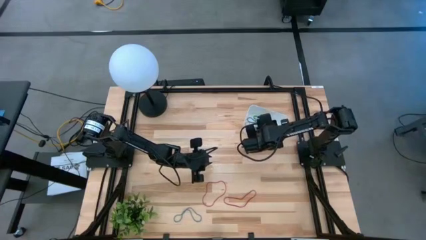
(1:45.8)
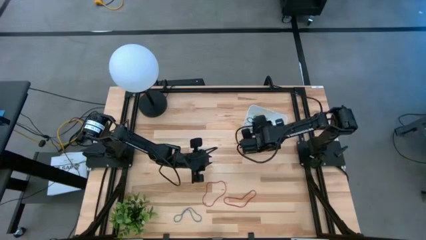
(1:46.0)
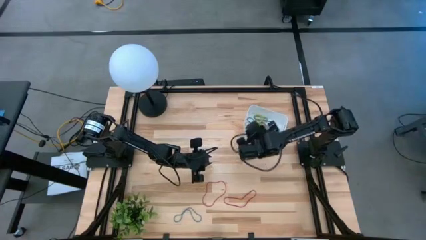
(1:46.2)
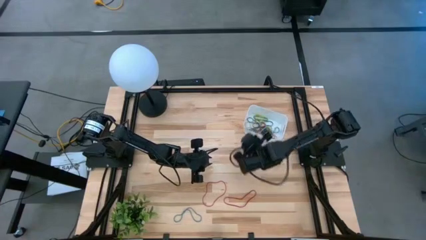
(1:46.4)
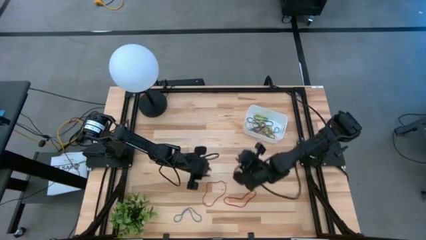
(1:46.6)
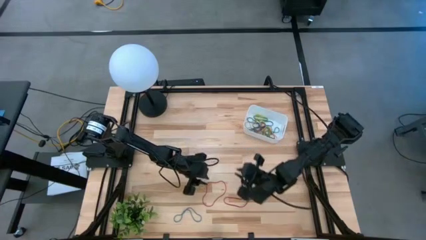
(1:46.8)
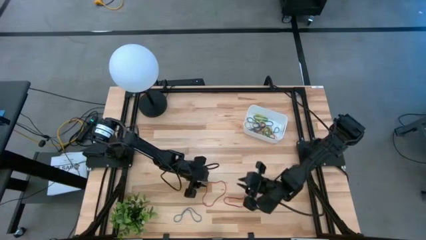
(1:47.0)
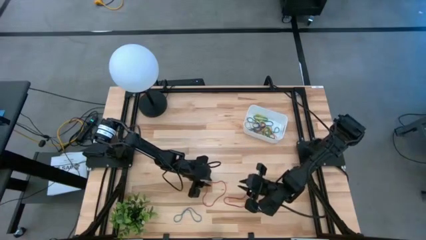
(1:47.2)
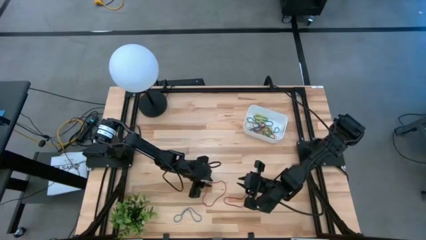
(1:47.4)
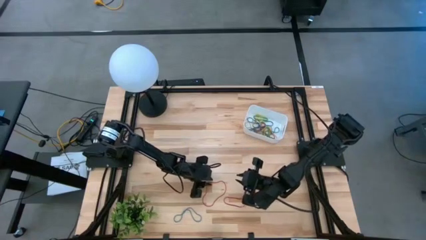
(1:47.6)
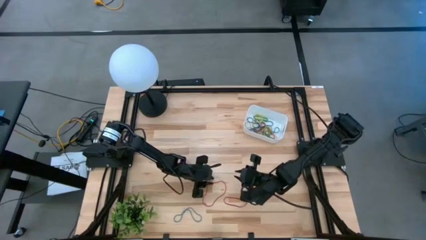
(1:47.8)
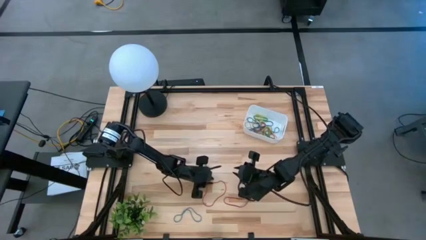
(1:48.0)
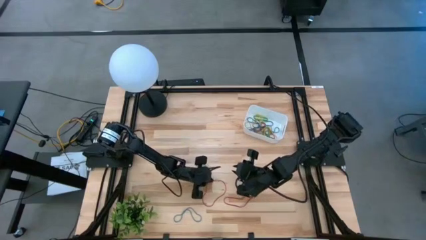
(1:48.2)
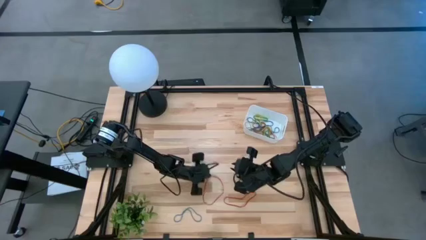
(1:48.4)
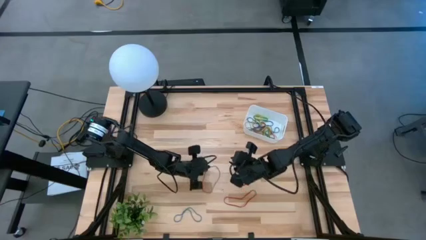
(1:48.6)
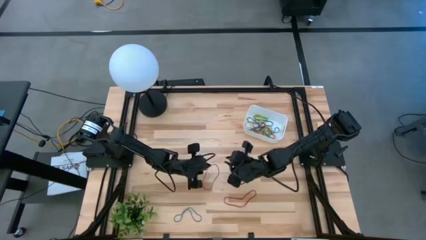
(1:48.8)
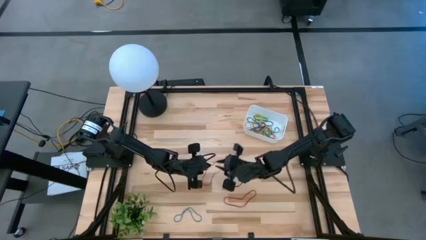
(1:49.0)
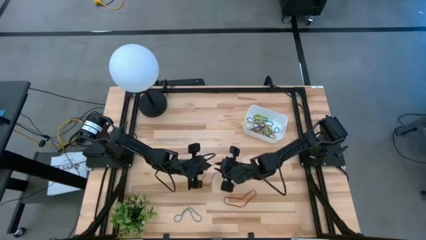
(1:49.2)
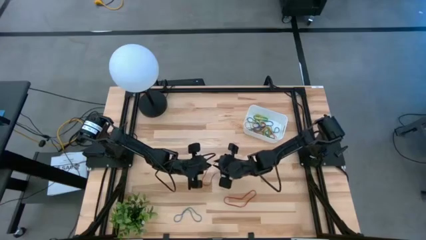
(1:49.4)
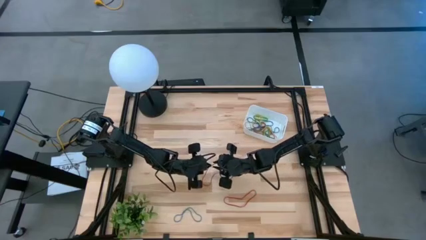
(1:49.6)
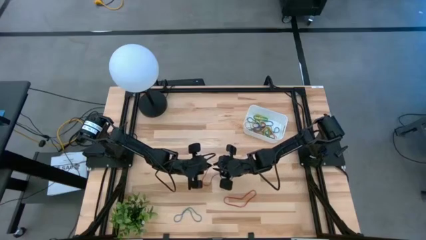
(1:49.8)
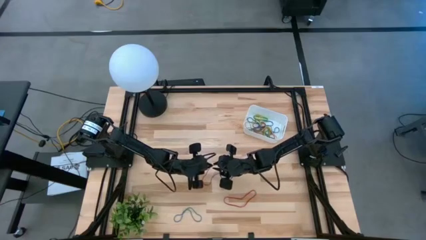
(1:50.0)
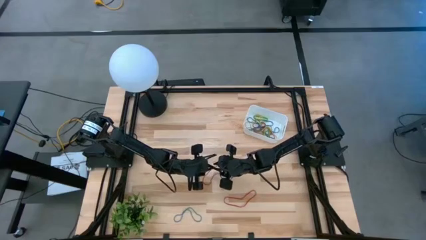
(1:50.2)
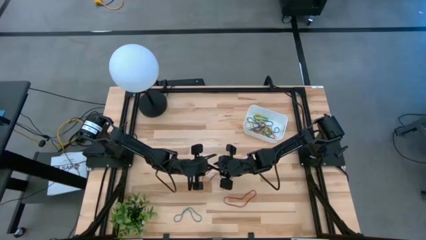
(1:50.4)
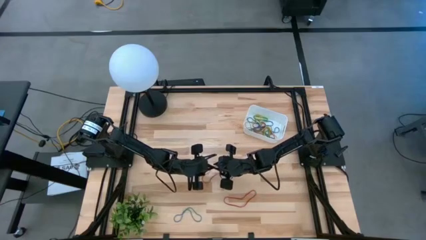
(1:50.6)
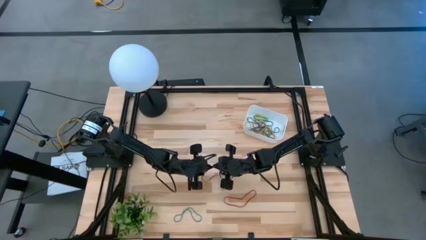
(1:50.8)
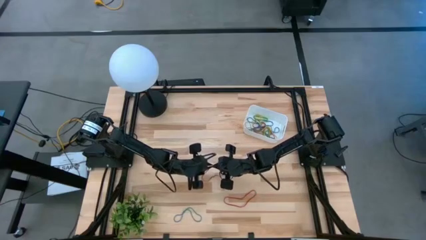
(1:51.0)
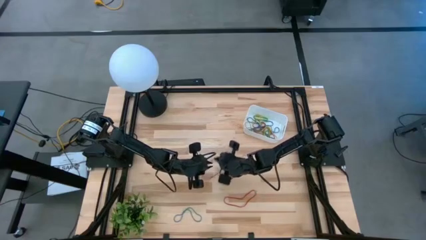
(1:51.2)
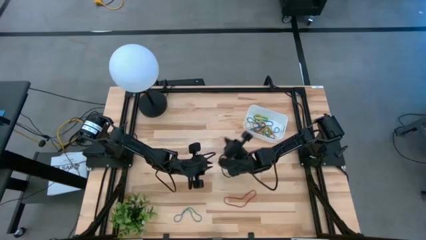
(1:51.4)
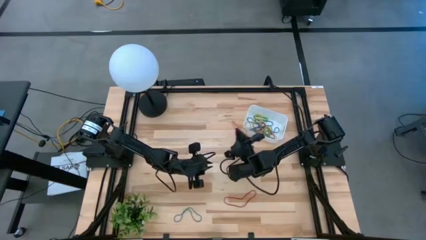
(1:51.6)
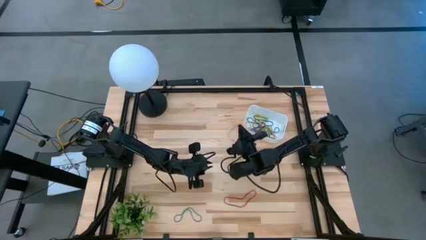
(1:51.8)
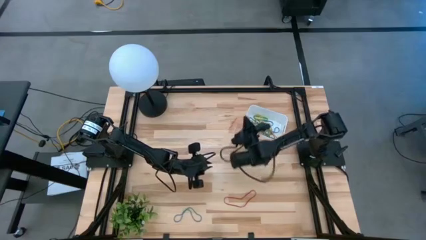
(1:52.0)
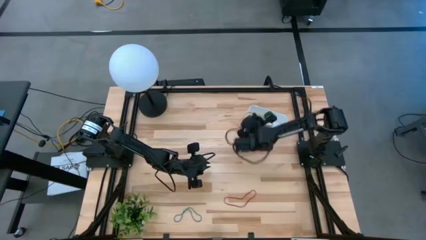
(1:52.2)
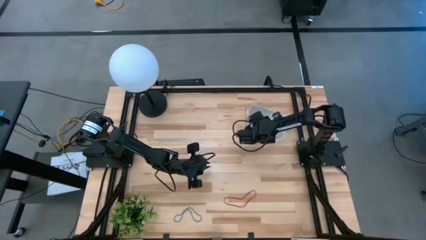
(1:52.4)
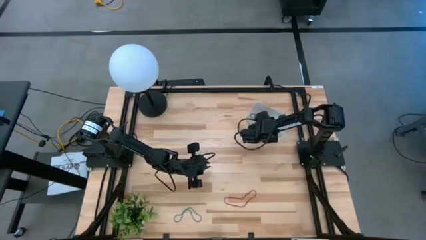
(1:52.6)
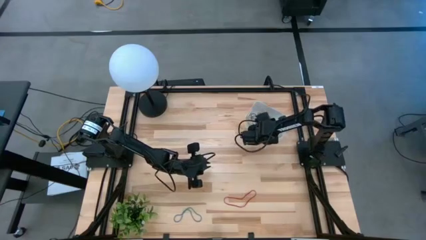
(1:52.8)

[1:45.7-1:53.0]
Task: Pick and place items into bin
Put the left red rubber band into the white bin

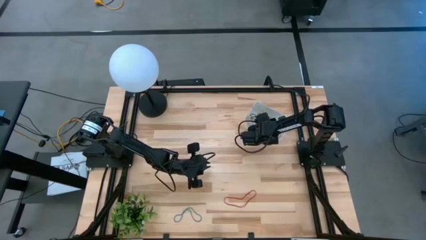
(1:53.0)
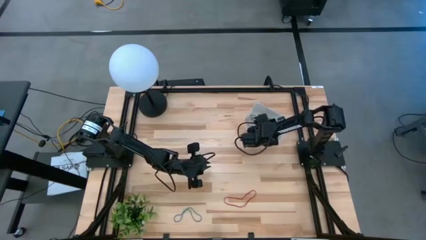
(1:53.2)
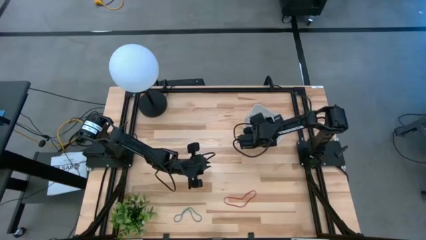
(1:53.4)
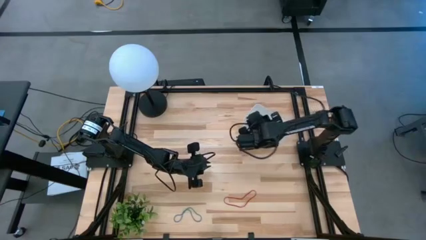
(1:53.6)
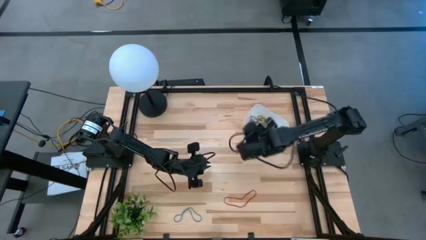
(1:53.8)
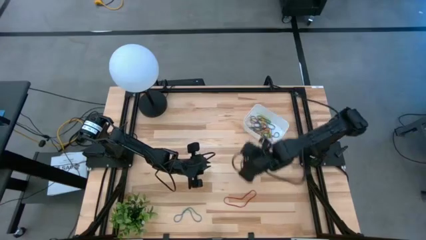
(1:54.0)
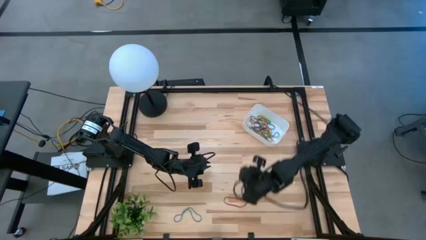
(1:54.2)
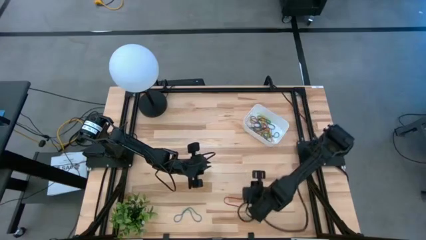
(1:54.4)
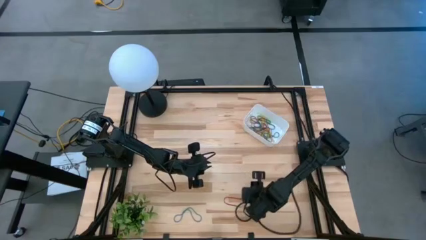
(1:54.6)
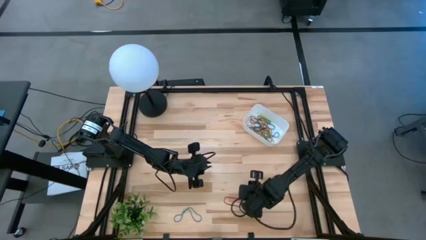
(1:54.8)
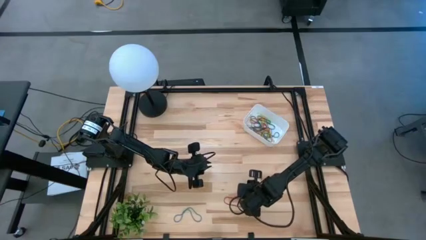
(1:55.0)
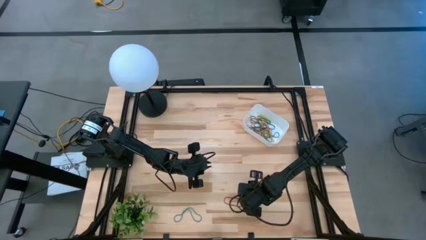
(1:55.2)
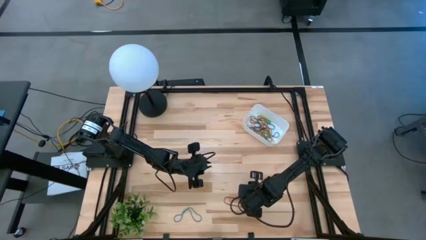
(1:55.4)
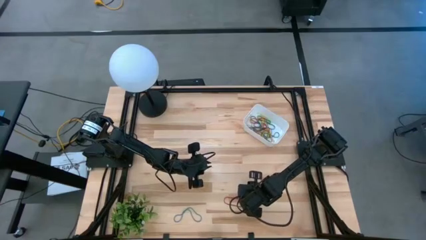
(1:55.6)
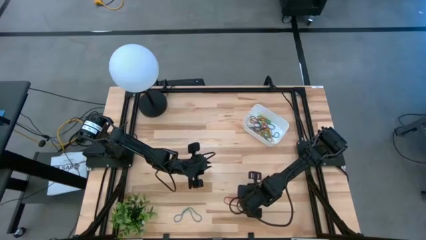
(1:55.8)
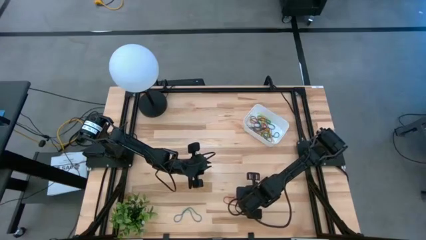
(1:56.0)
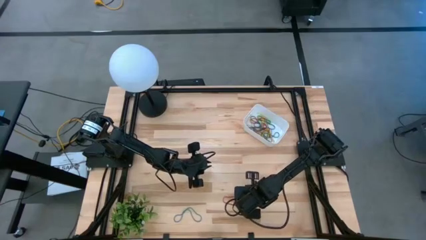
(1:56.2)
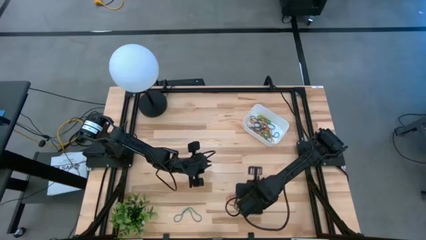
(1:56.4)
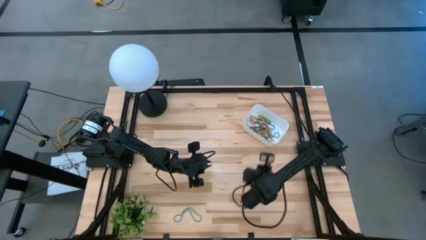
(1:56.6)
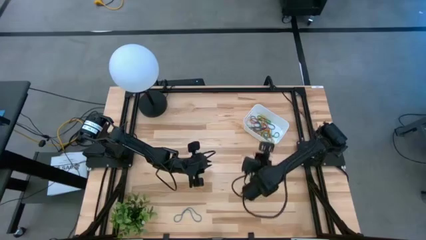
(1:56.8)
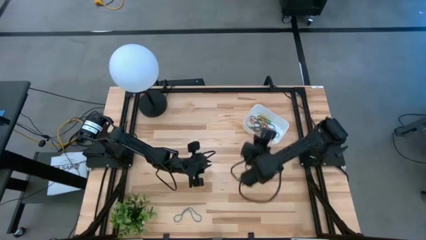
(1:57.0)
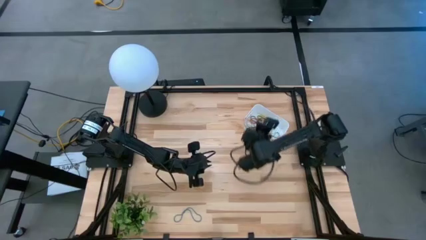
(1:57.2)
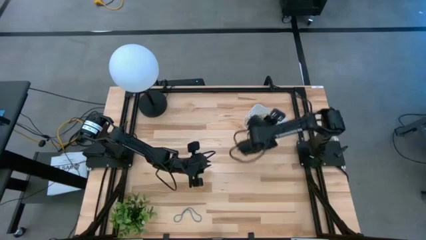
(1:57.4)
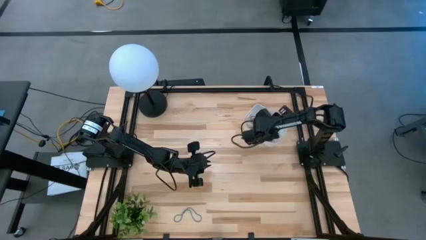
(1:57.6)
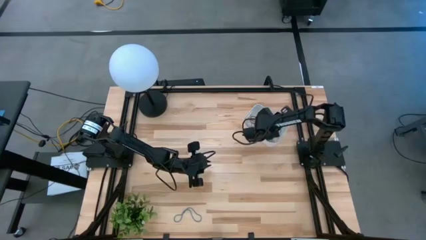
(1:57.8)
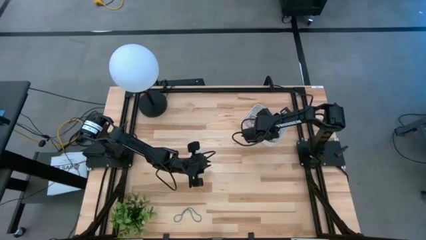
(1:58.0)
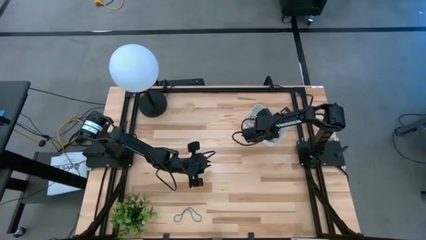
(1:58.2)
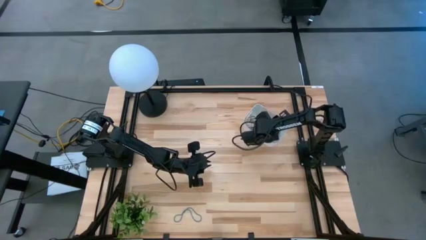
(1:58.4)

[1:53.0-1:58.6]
Put the red rubber band into the white bin

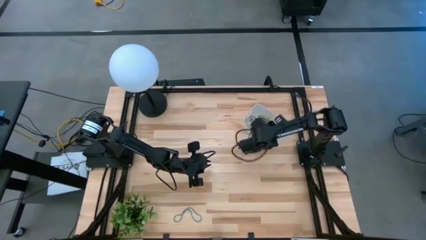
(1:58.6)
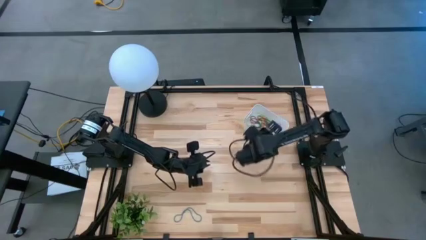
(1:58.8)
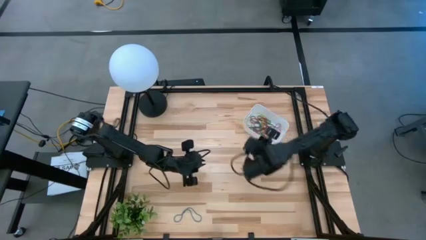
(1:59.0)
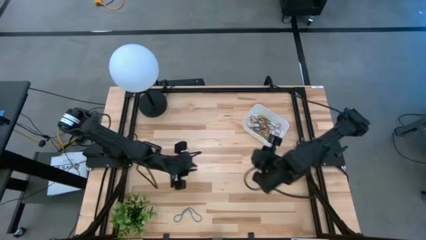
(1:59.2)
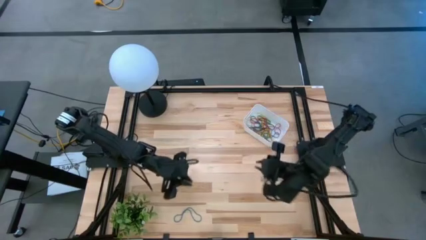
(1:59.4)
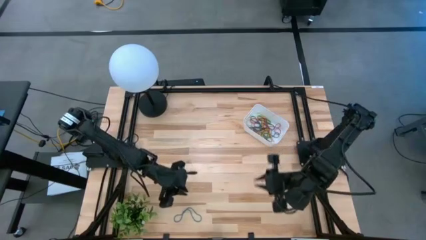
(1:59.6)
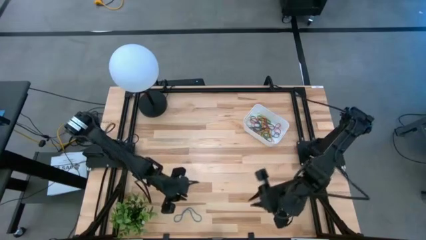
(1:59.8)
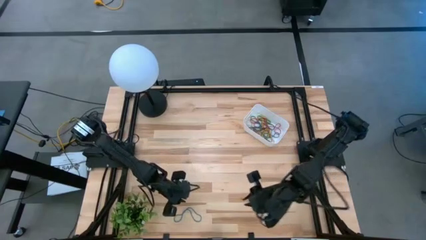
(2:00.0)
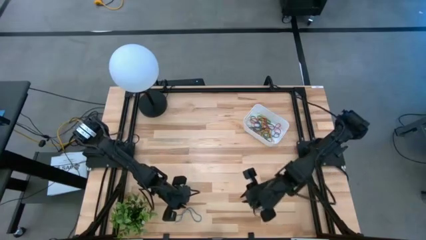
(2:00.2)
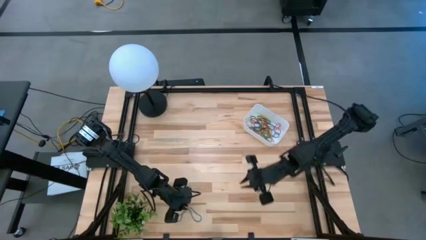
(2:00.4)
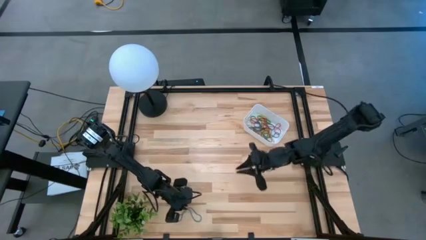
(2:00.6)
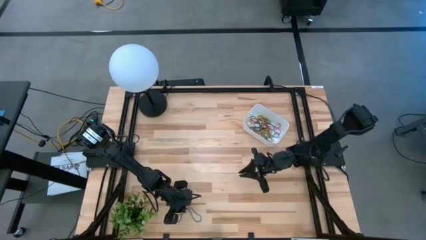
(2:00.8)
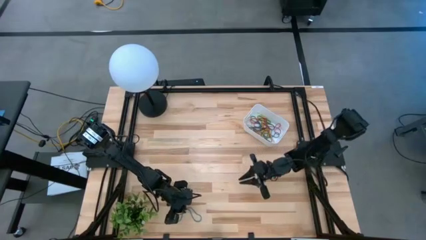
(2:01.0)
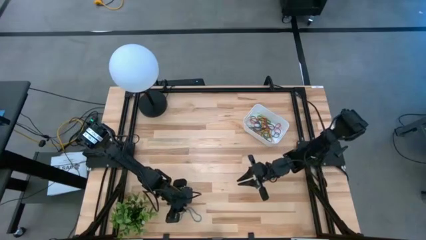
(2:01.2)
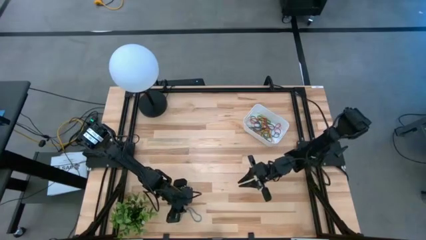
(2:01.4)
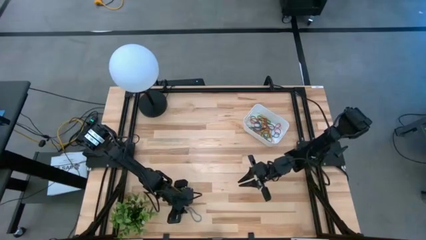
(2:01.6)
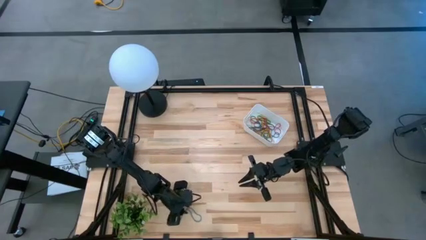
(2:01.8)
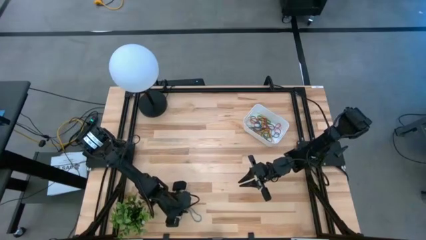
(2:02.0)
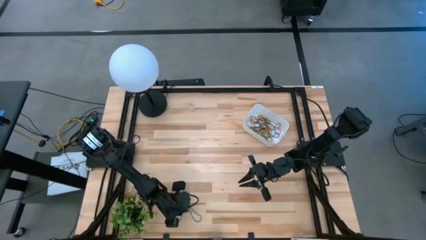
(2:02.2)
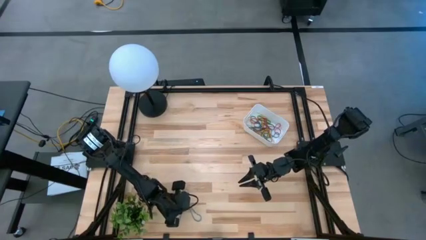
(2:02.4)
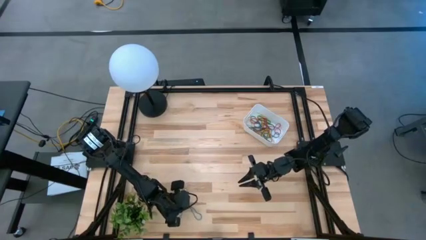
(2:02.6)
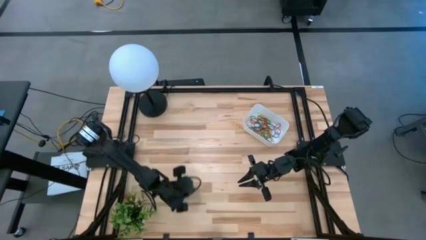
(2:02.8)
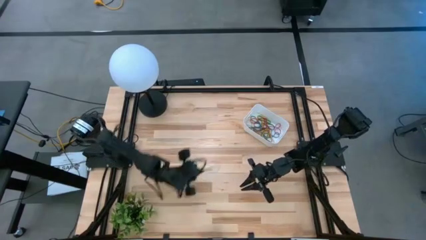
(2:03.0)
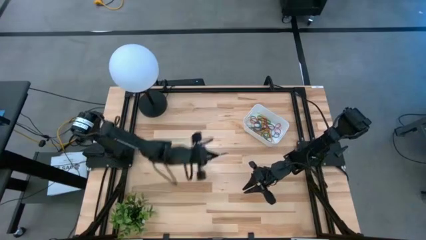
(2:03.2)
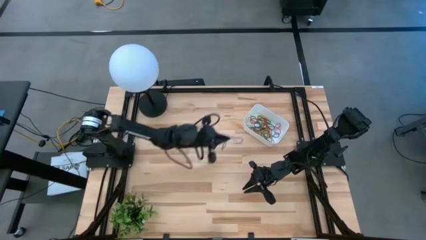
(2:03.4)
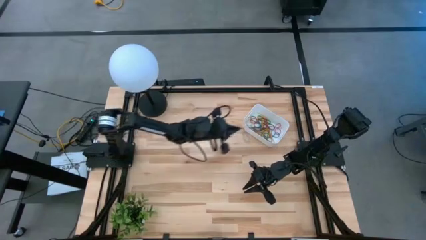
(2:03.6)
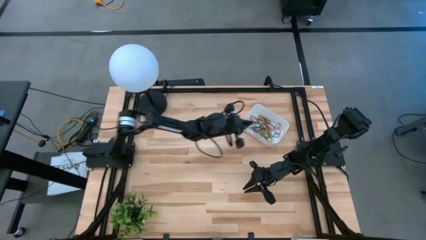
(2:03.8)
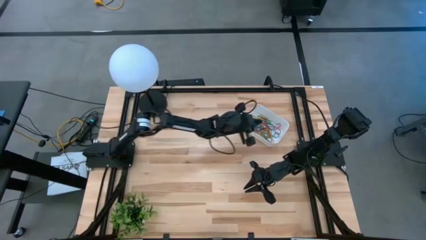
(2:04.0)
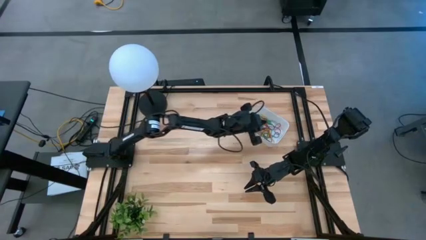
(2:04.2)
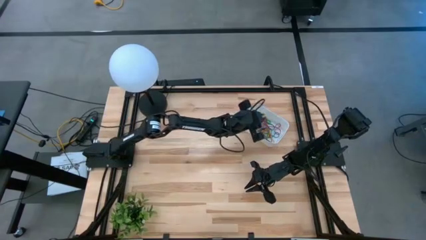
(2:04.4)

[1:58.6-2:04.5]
Put the blue rubber band into the white bin
